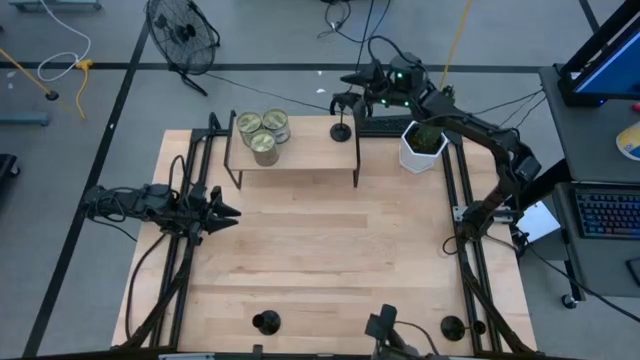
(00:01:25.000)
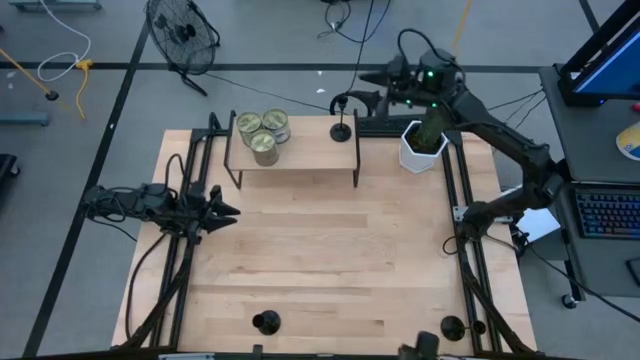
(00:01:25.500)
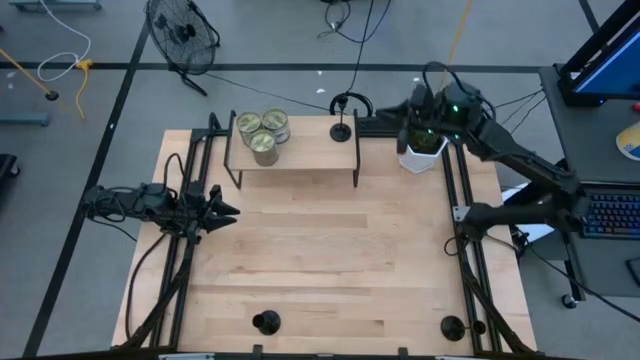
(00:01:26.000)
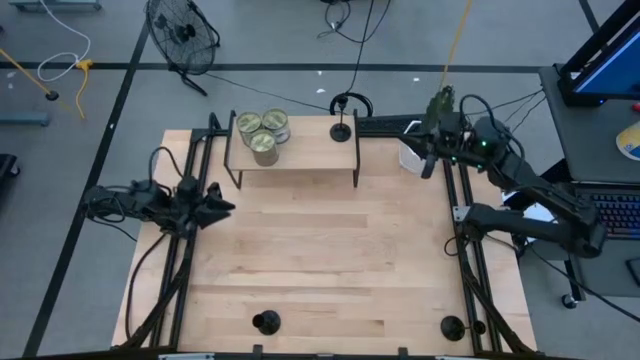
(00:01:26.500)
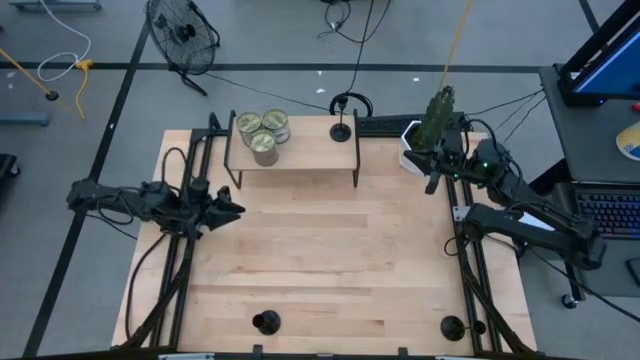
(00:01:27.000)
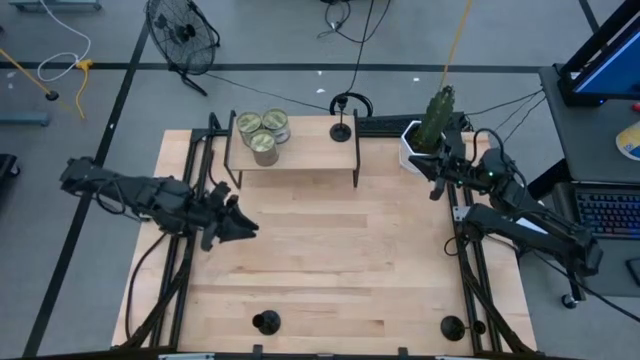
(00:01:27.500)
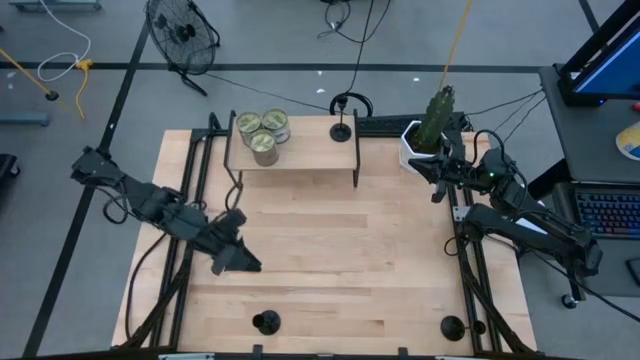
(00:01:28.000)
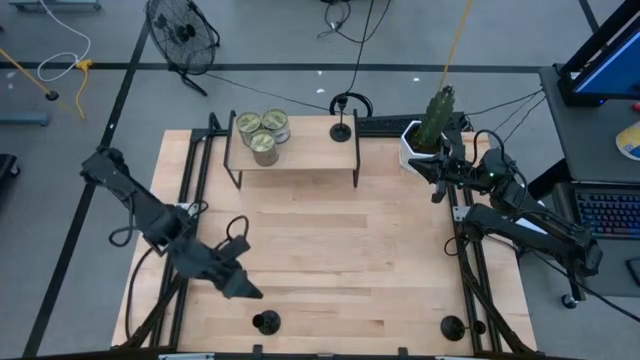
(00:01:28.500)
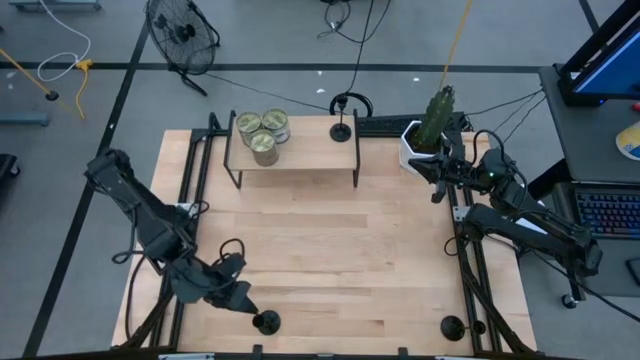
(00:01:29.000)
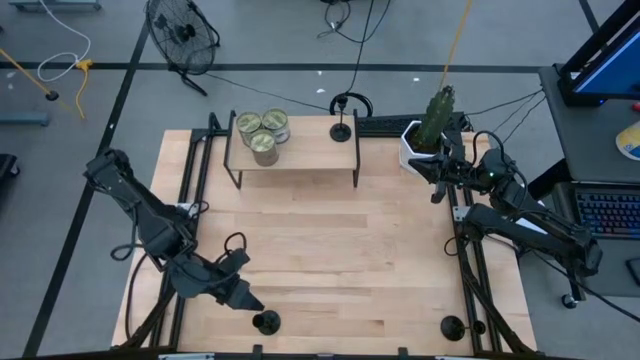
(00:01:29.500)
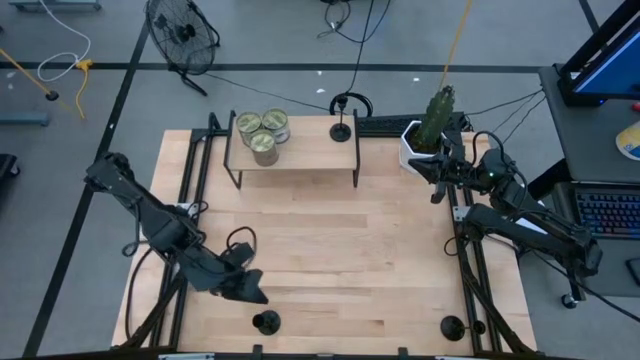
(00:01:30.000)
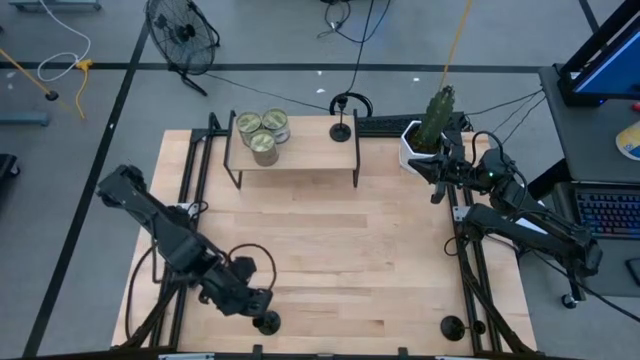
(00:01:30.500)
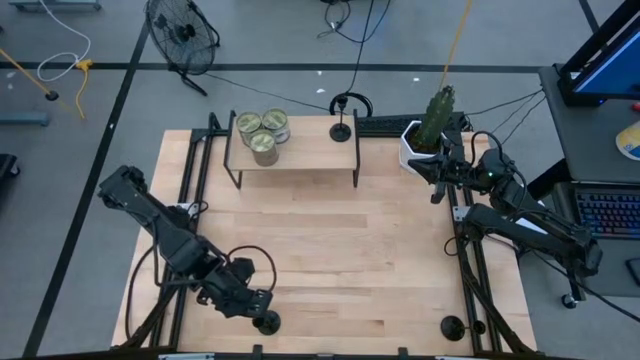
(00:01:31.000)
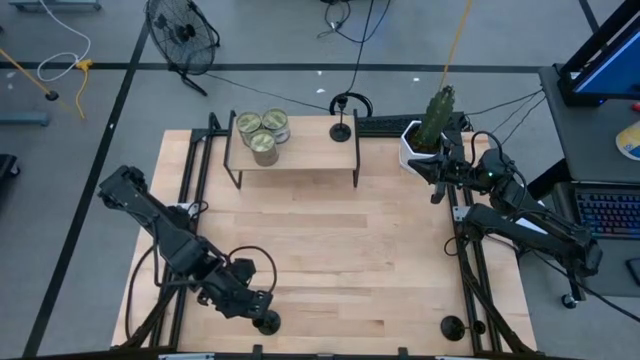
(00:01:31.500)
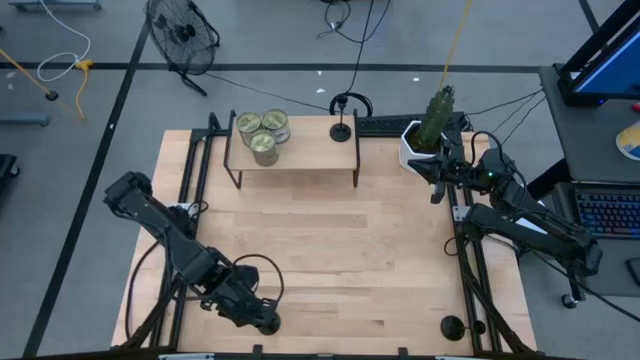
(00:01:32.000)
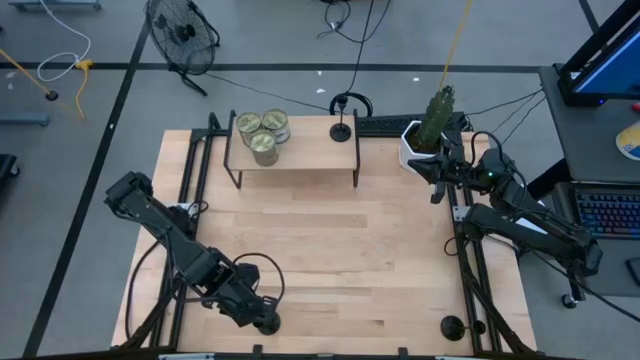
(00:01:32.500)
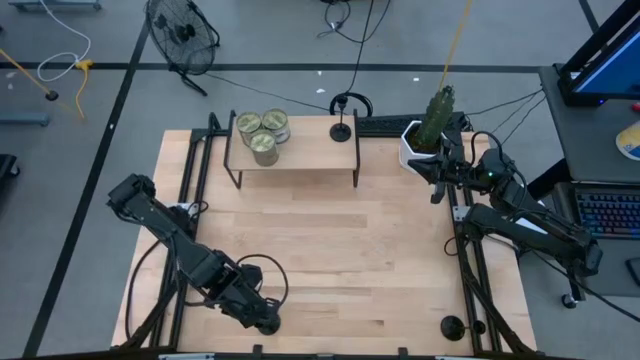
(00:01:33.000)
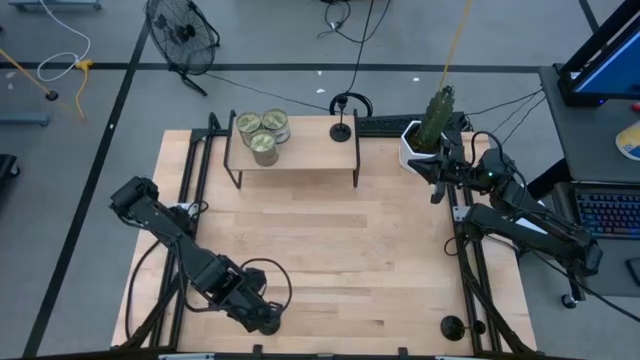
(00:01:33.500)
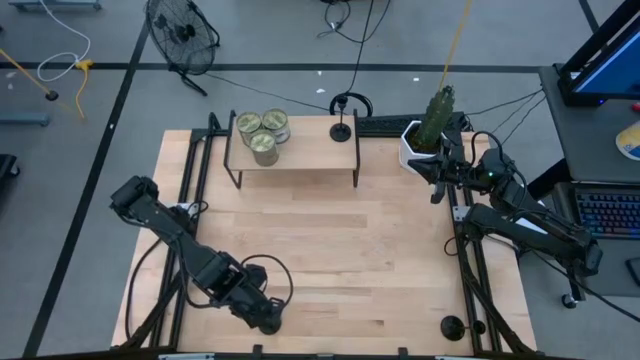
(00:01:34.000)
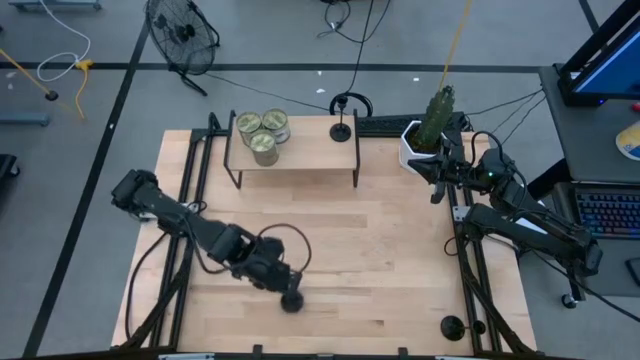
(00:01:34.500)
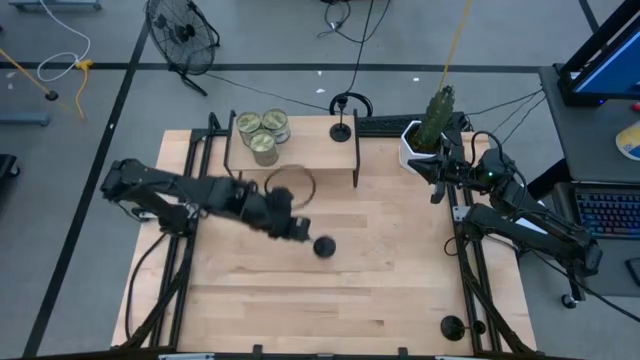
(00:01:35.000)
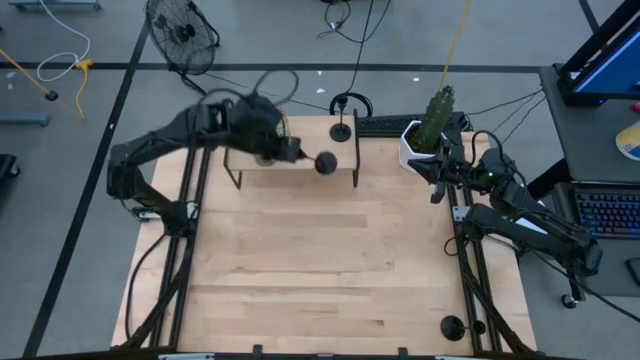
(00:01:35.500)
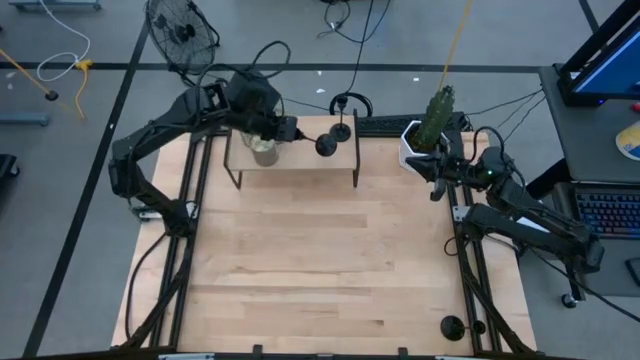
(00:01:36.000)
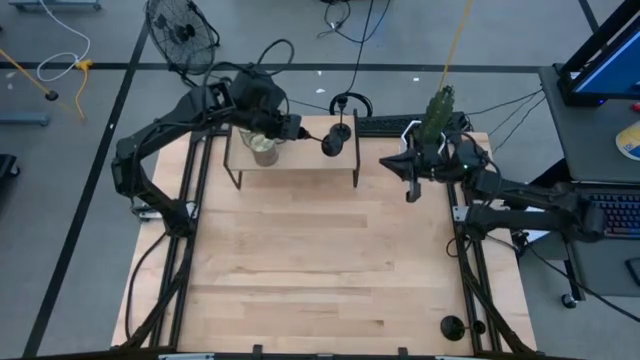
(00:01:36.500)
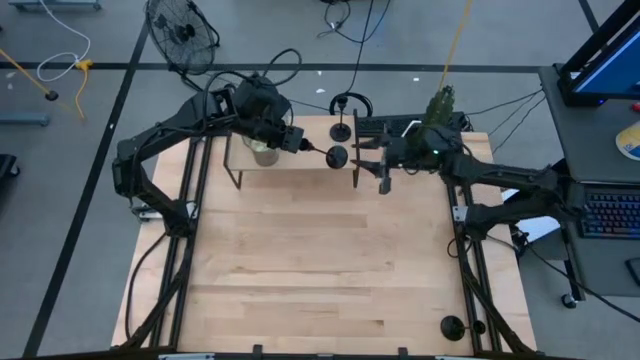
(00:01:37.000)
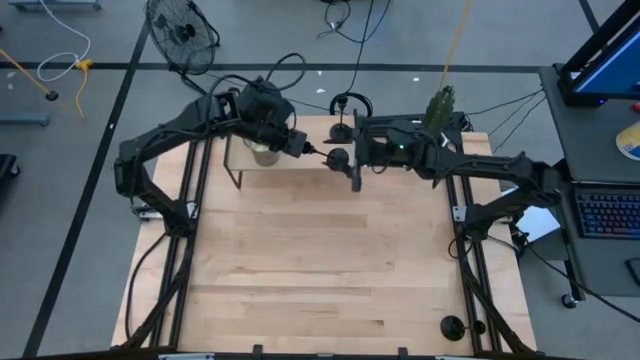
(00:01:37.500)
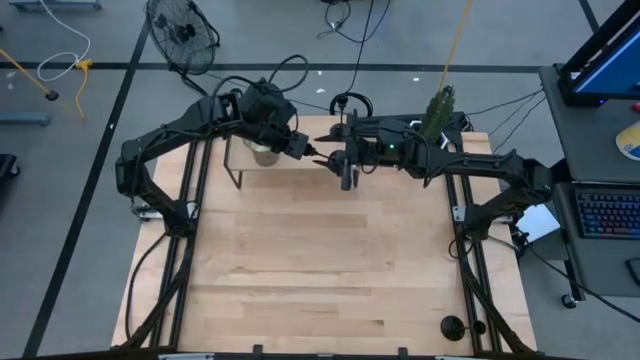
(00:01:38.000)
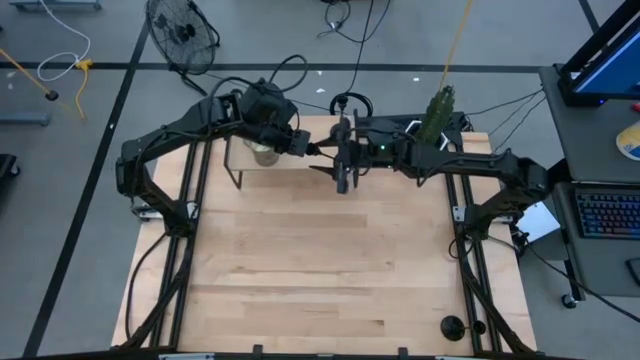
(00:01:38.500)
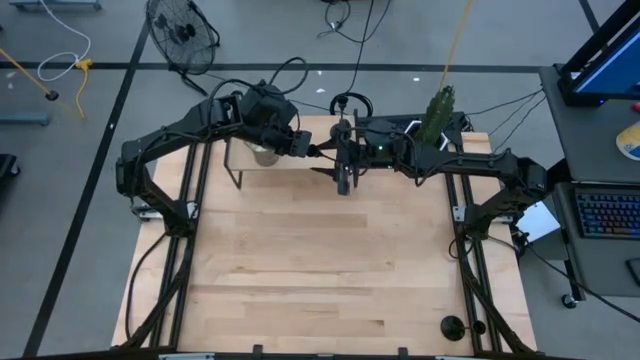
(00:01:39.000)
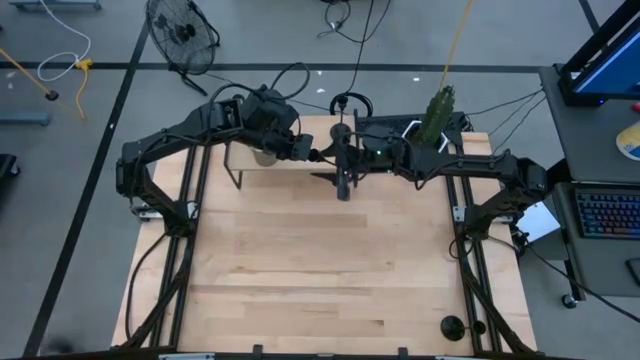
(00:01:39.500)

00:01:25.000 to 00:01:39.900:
Task: Pick & Place candle stick holders
Put the left black candle holder on the shelf
